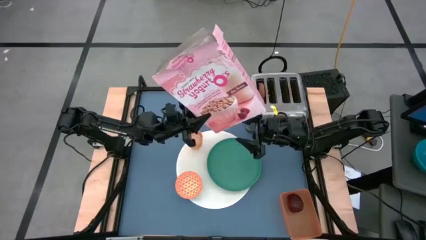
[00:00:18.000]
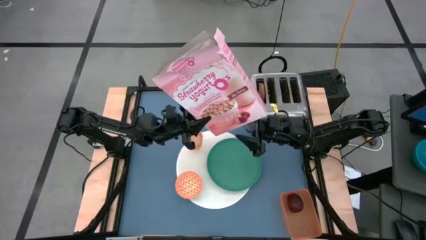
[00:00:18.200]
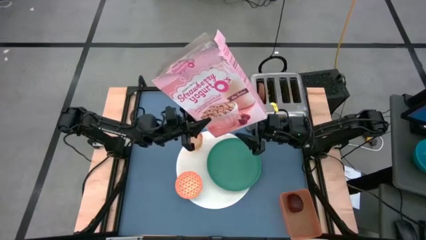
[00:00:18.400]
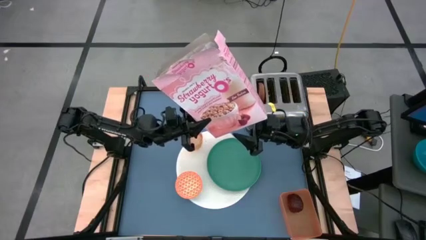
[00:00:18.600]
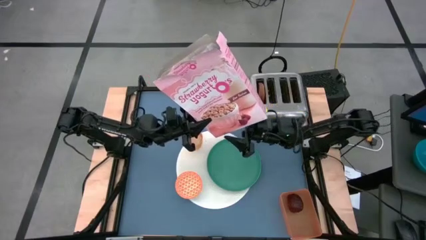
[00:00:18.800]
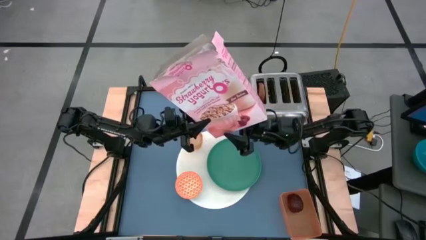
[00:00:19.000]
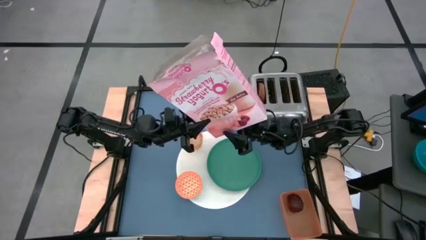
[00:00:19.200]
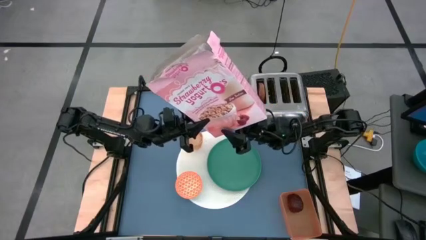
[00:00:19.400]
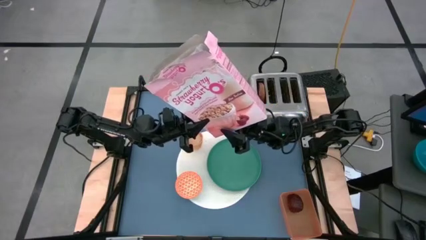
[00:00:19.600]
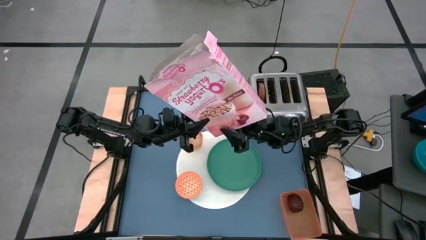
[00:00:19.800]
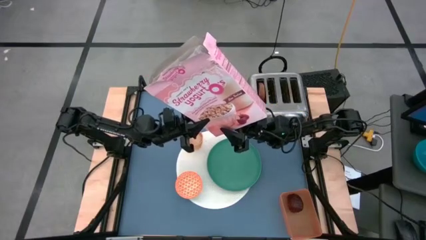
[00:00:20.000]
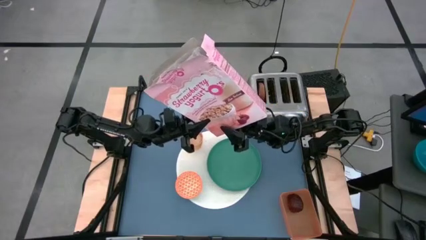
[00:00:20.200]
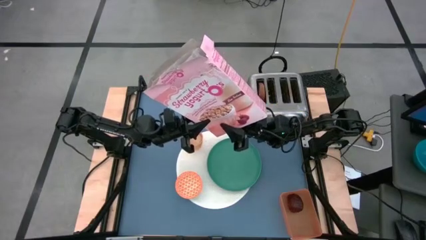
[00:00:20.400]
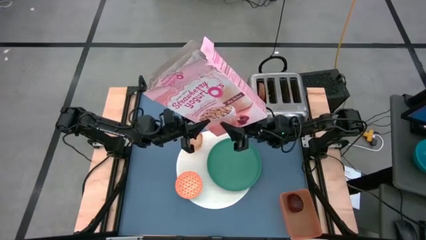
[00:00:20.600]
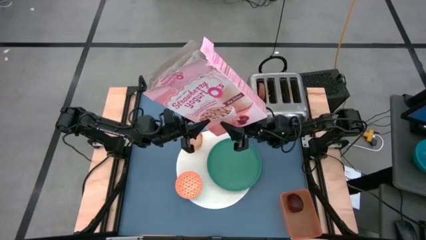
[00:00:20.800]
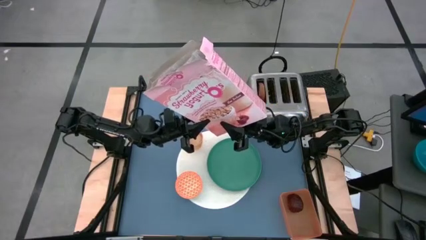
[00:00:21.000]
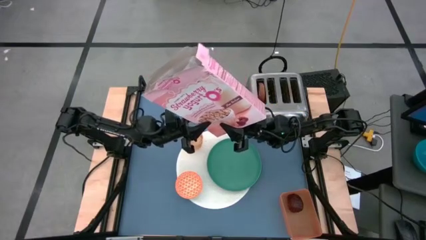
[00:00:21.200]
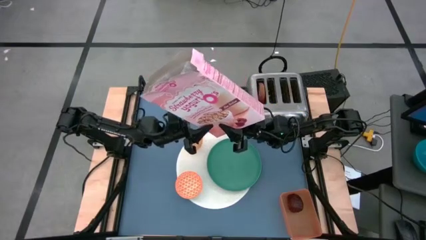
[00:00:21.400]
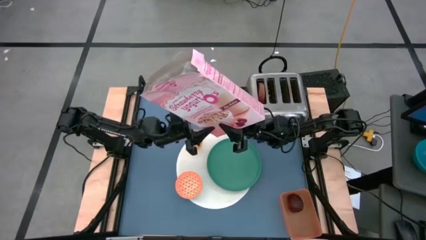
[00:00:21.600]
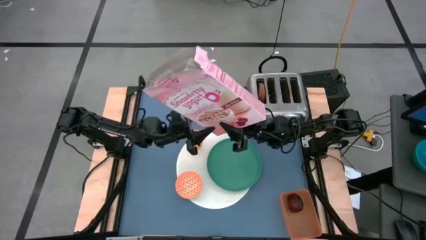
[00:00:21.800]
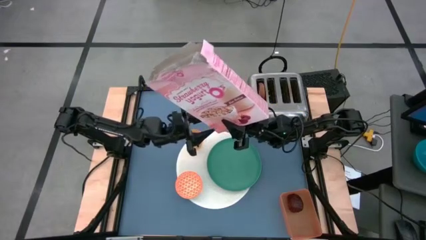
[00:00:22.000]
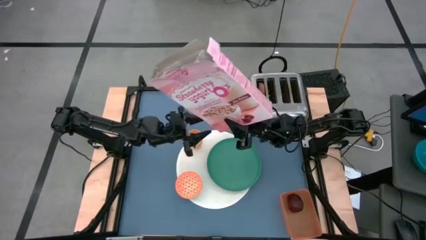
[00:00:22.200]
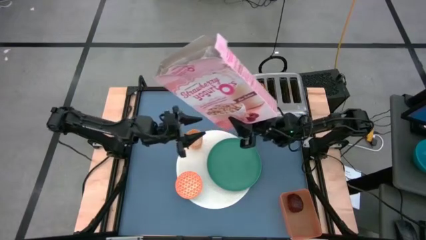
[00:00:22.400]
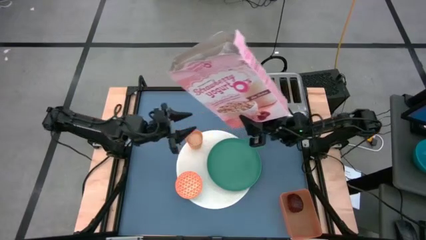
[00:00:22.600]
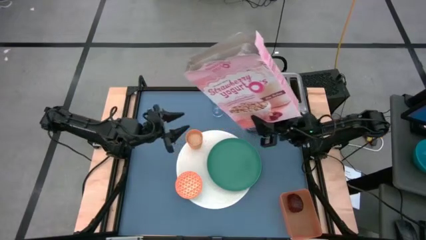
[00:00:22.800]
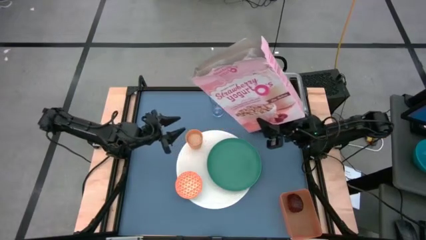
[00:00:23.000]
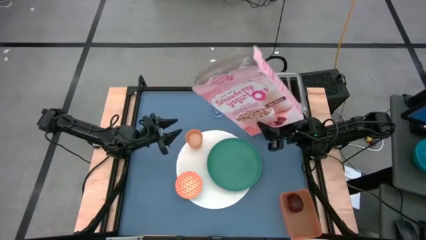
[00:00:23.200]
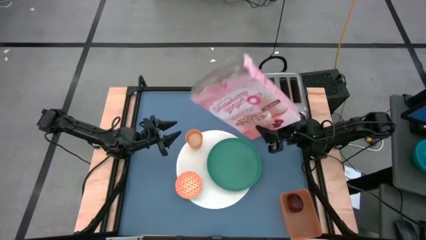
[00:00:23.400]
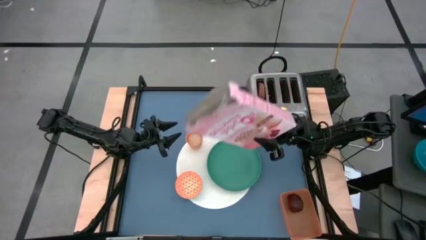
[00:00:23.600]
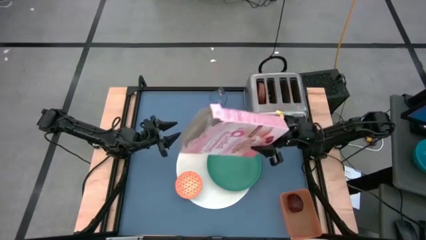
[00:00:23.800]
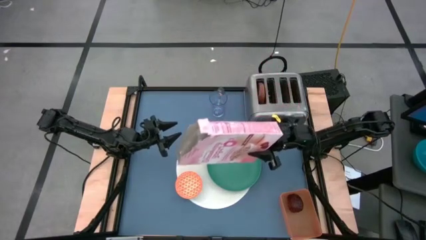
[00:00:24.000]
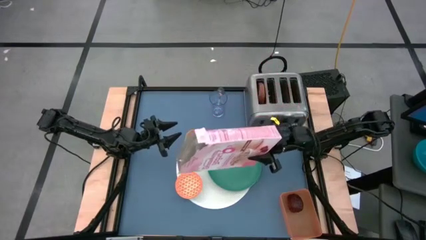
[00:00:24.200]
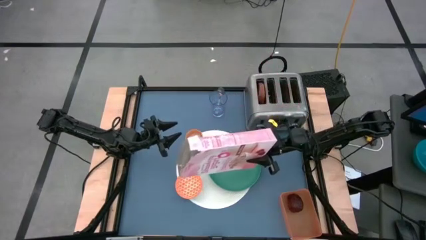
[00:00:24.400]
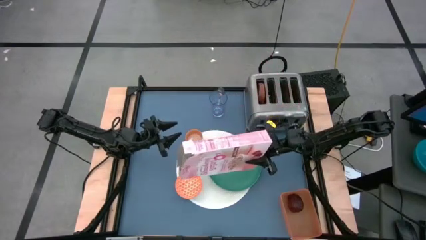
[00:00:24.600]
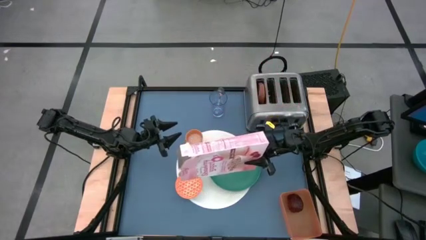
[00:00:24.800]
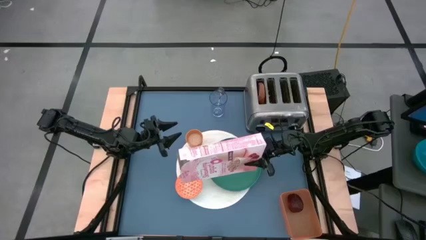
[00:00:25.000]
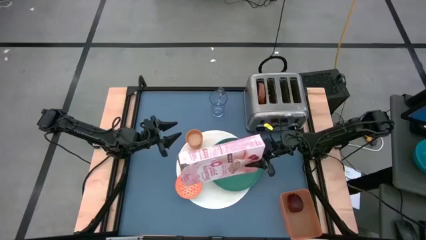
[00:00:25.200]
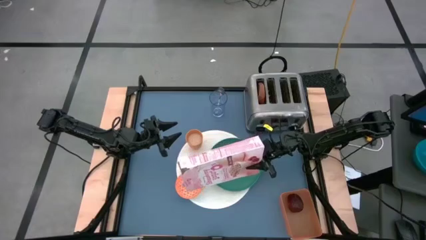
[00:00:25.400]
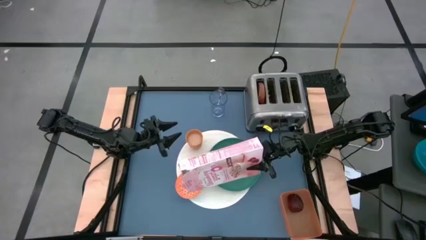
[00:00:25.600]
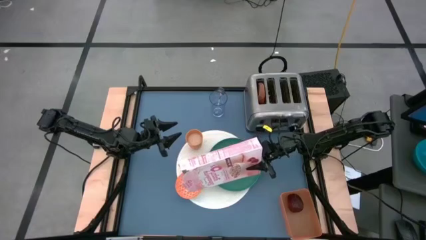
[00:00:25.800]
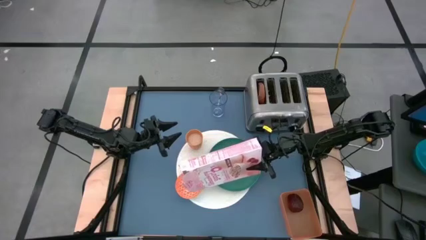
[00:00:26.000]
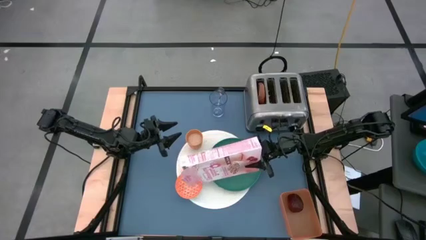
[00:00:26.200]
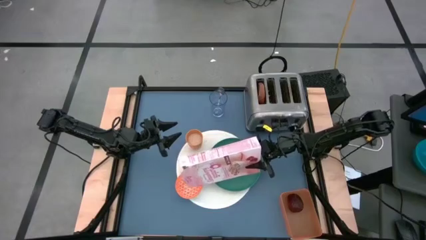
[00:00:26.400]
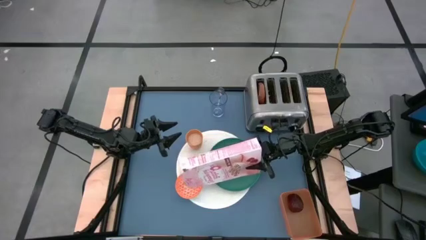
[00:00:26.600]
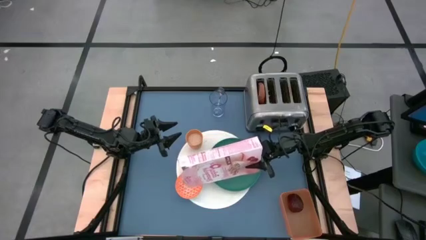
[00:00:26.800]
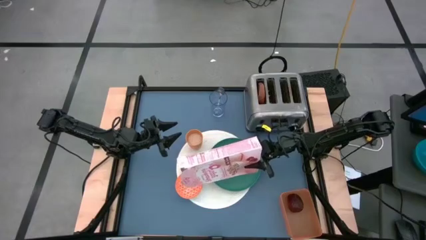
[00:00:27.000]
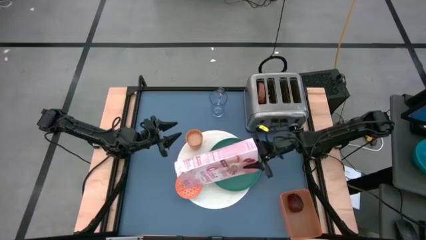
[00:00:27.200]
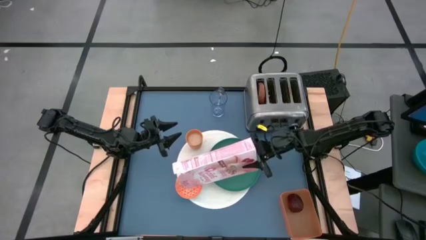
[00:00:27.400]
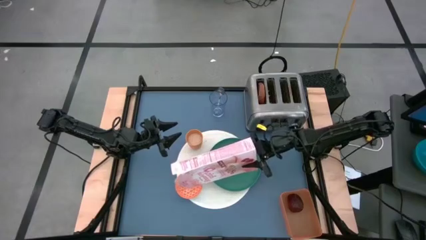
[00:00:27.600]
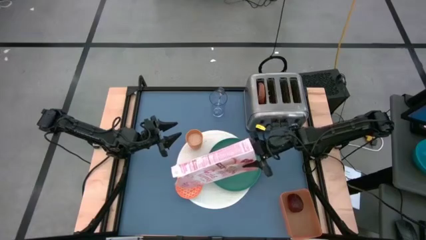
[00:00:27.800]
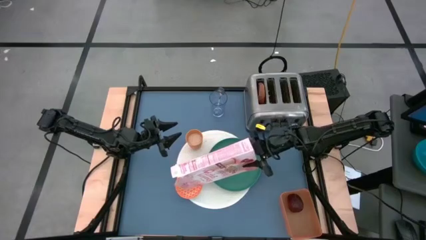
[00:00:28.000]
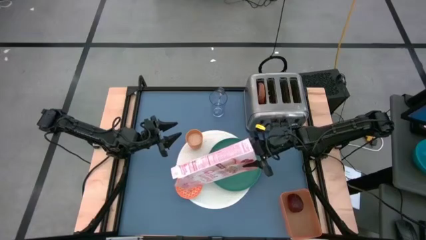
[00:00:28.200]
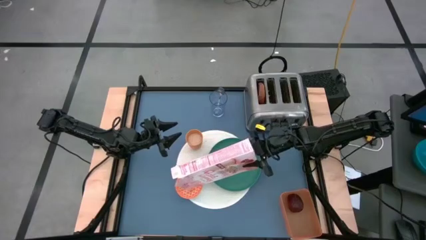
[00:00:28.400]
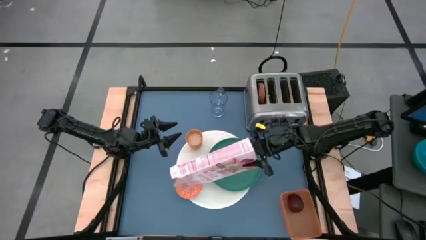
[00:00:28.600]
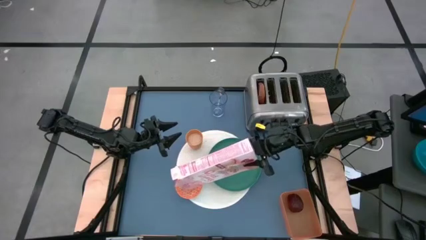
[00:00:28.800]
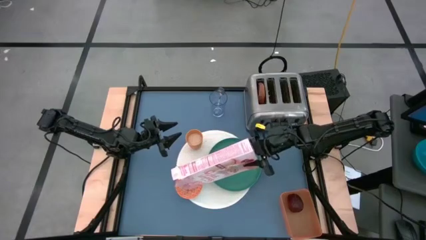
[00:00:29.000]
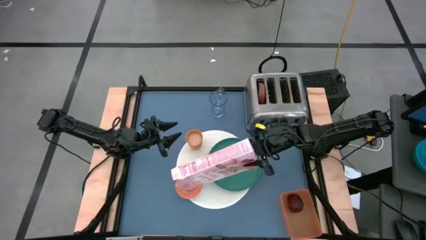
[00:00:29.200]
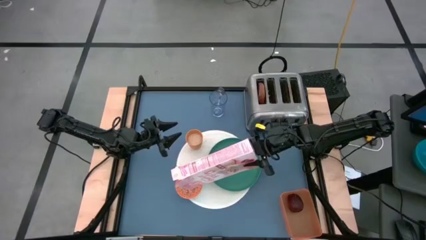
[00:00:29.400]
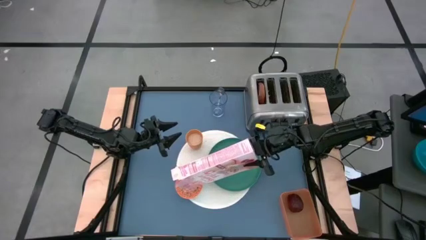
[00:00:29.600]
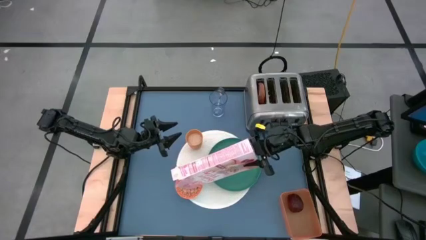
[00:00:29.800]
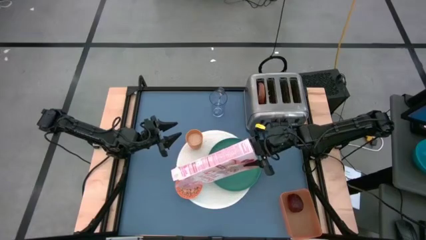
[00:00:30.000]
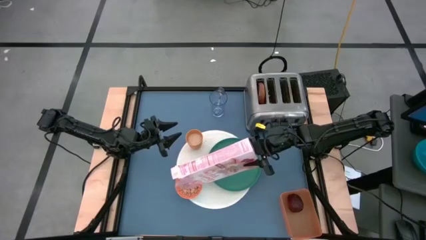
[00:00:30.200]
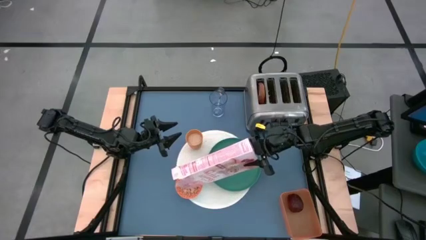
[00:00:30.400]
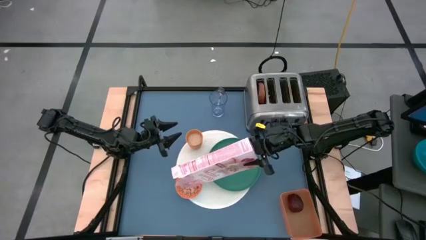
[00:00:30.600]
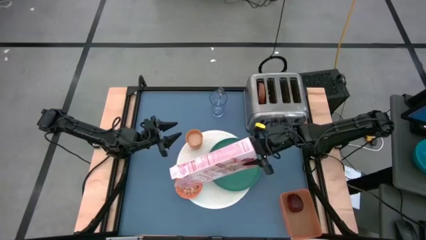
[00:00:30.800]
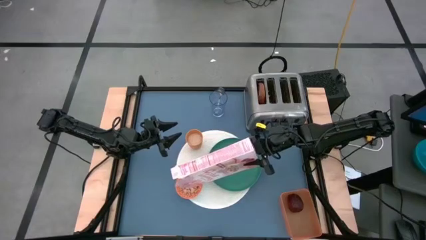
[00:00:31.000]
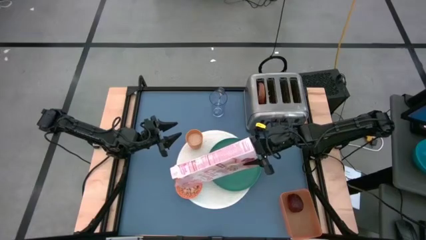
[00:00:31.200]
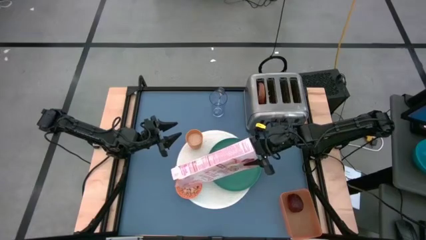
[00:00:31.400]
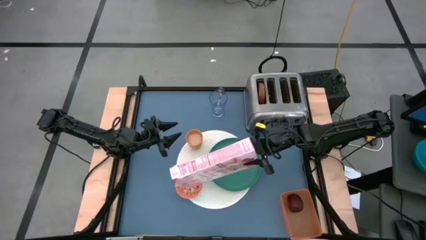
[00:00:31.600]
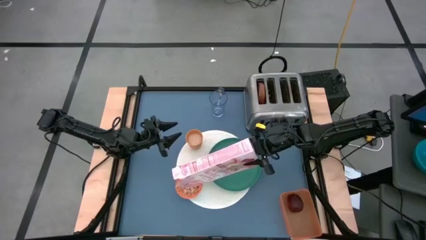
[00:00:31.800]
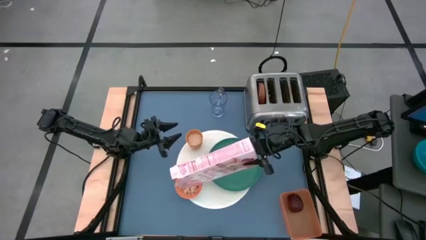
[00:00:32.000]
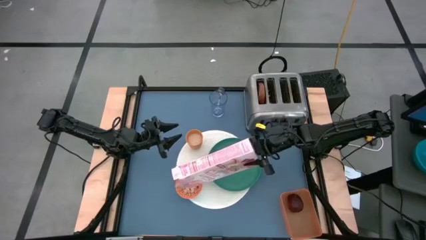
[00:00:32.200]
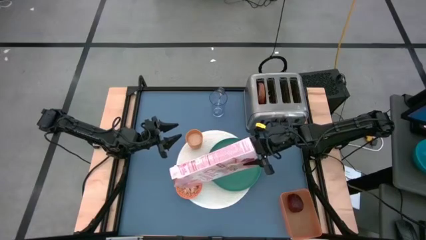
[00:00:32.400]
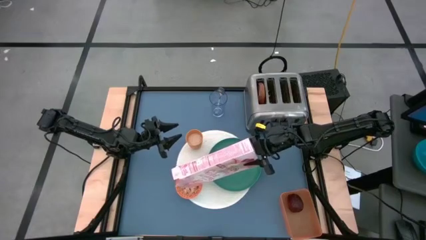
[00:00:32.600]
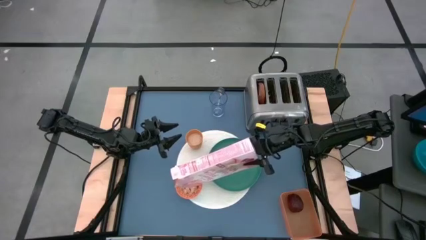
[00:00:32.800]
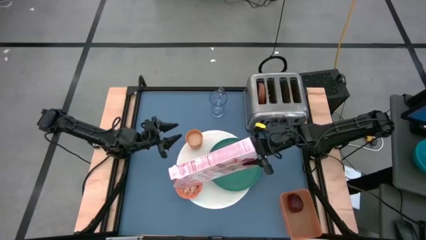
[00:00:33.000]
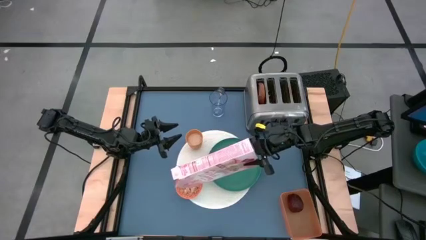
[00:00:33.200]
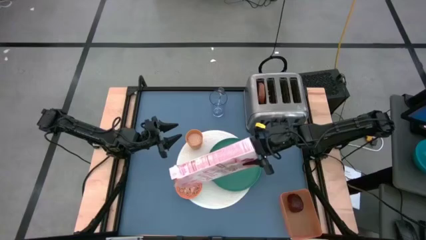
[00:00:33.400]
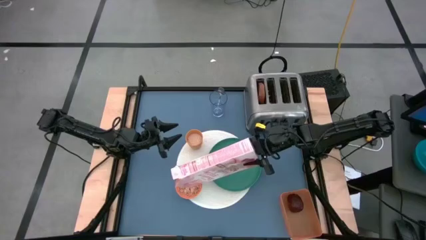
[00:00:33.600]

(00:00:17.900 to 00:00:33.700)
Task: Arrange a breakfast setting
Pour the cereal from the orange cereal box into the orange bowl
